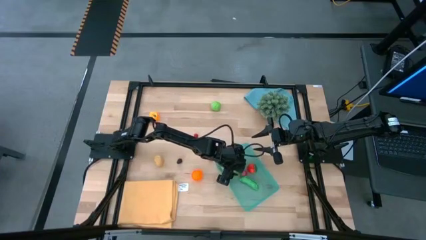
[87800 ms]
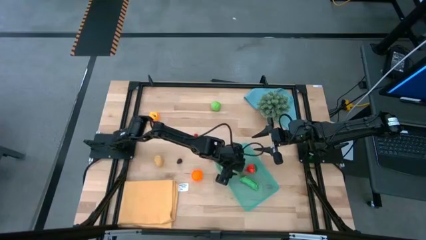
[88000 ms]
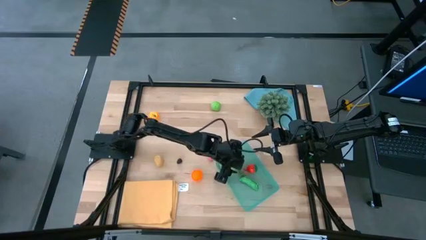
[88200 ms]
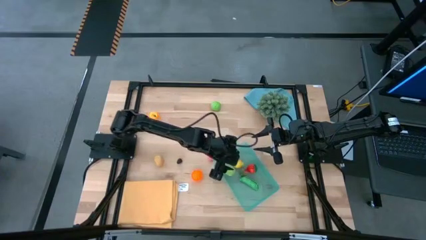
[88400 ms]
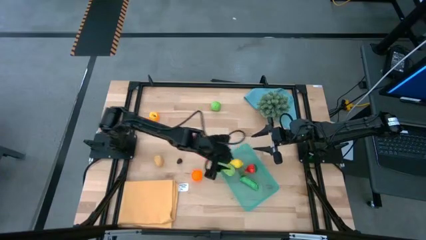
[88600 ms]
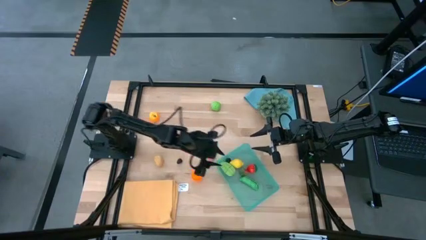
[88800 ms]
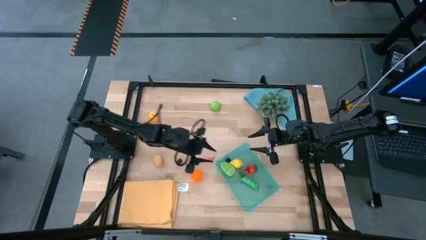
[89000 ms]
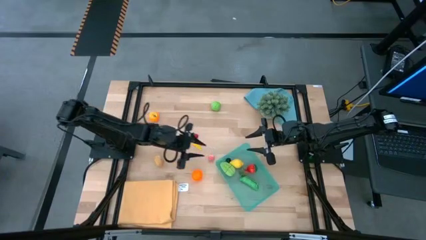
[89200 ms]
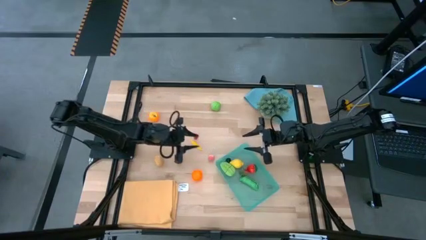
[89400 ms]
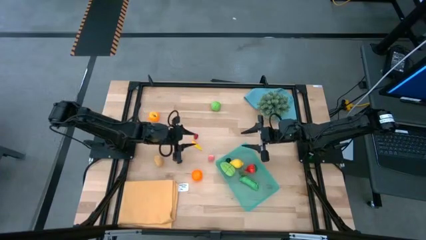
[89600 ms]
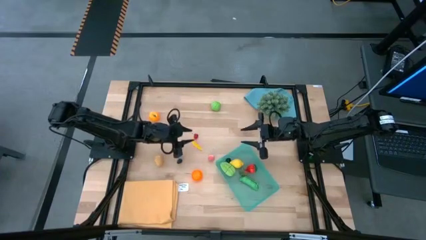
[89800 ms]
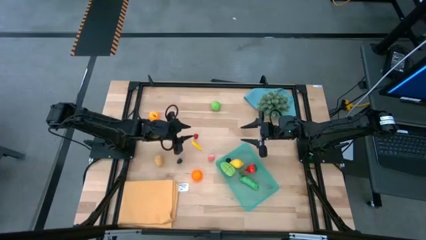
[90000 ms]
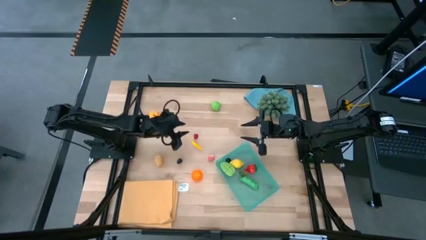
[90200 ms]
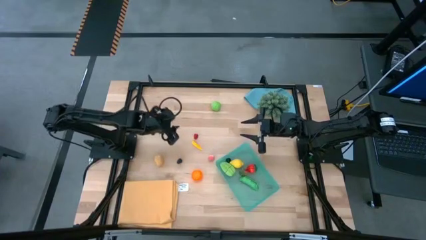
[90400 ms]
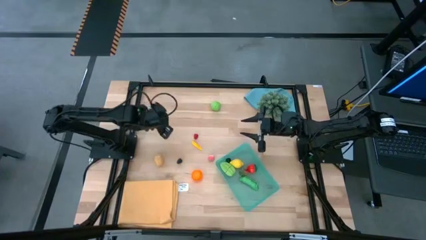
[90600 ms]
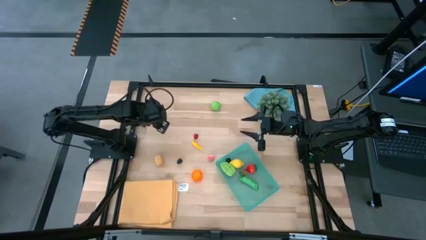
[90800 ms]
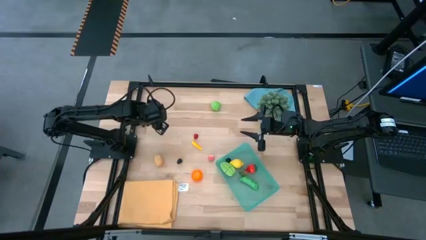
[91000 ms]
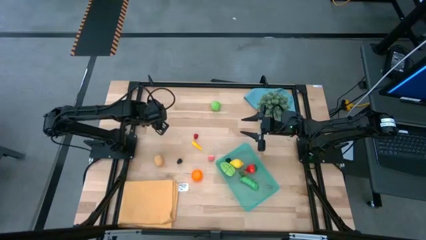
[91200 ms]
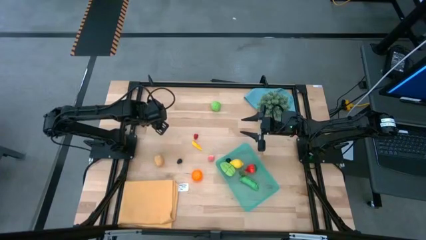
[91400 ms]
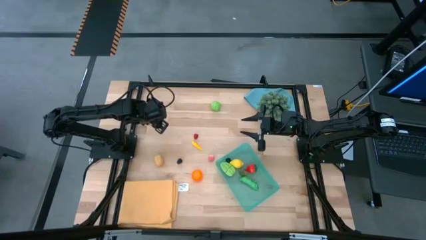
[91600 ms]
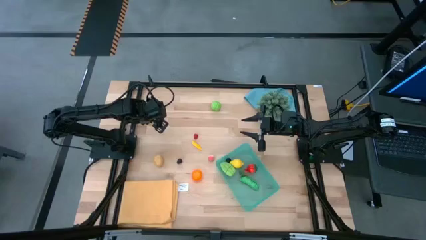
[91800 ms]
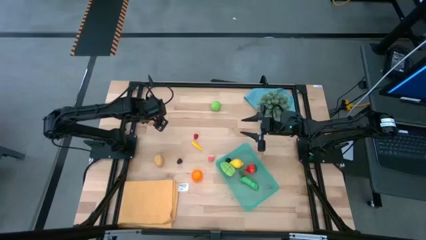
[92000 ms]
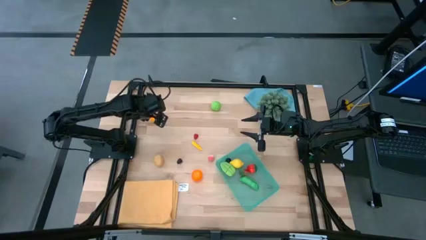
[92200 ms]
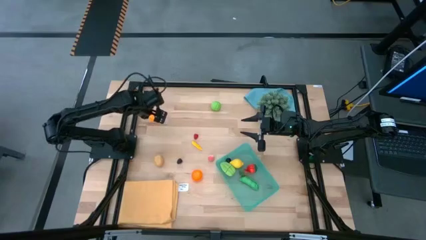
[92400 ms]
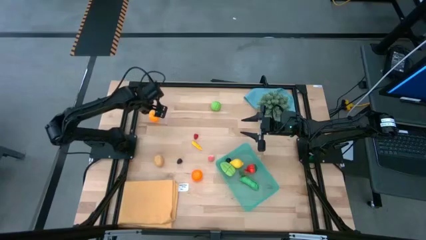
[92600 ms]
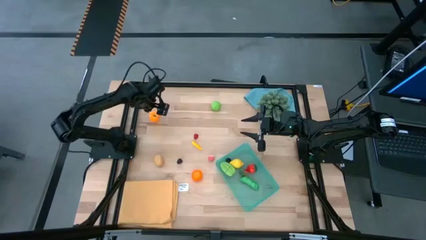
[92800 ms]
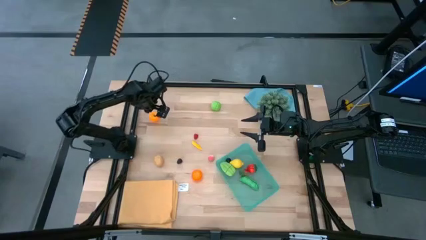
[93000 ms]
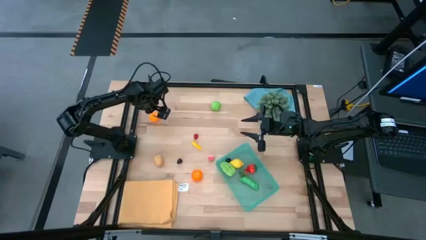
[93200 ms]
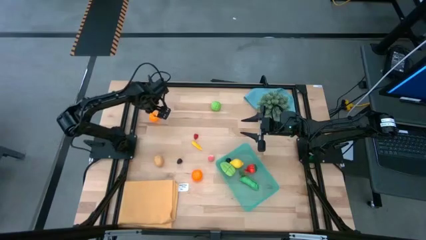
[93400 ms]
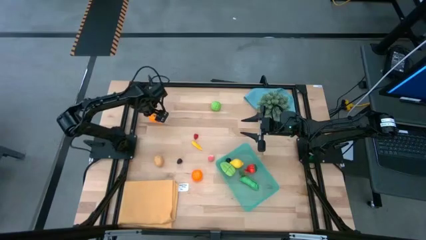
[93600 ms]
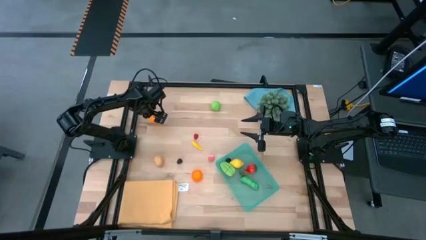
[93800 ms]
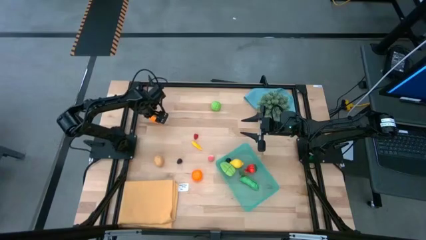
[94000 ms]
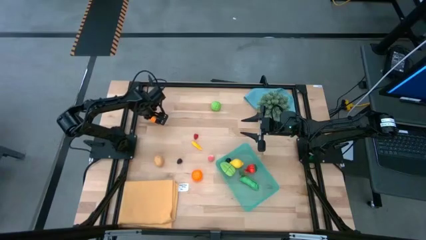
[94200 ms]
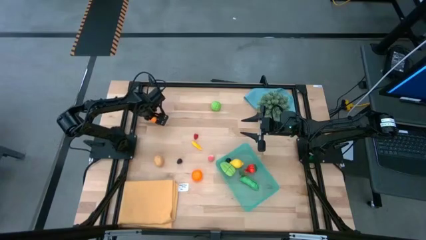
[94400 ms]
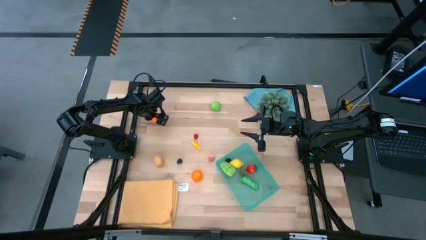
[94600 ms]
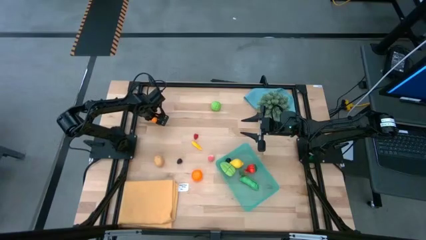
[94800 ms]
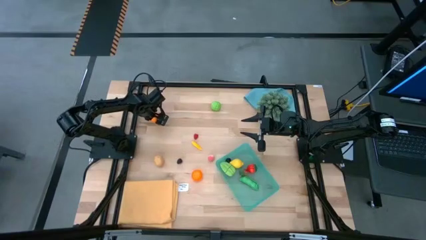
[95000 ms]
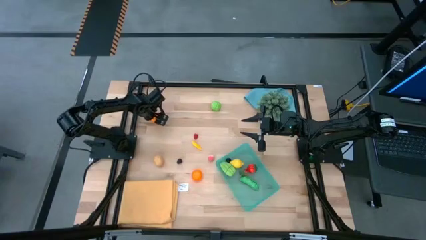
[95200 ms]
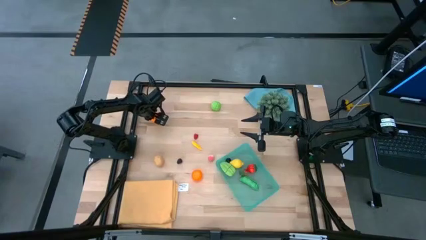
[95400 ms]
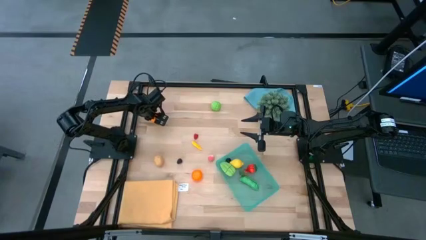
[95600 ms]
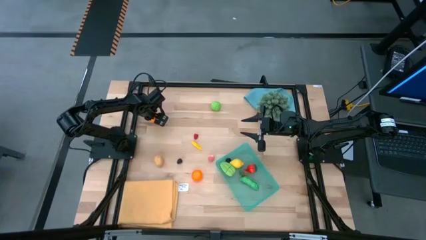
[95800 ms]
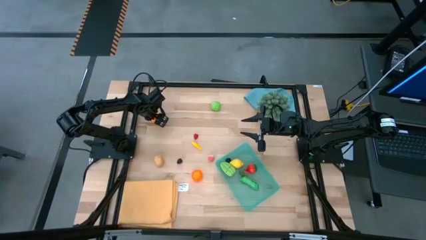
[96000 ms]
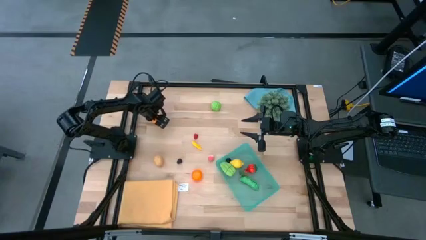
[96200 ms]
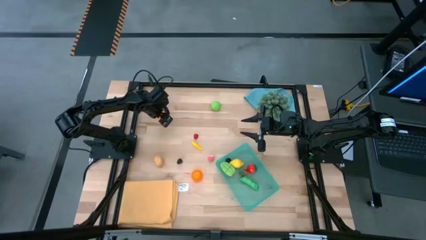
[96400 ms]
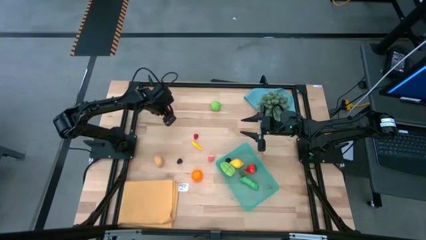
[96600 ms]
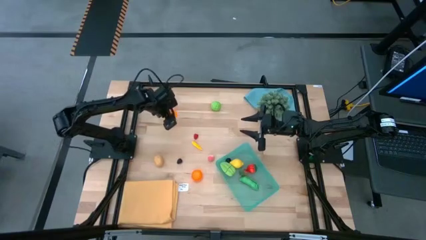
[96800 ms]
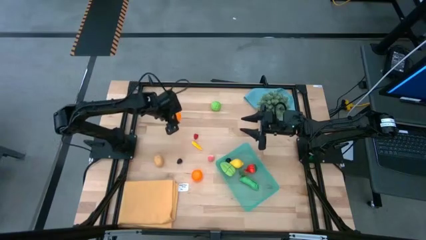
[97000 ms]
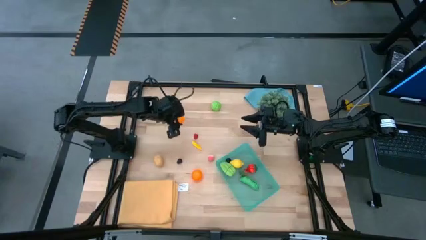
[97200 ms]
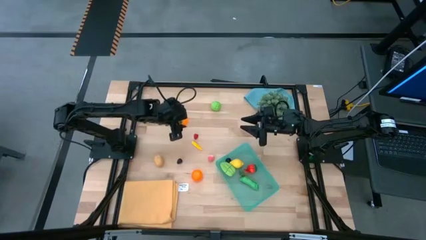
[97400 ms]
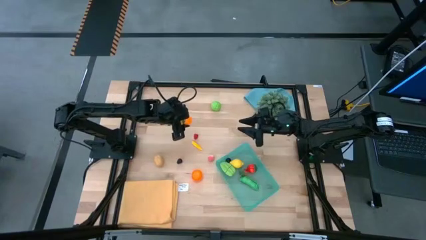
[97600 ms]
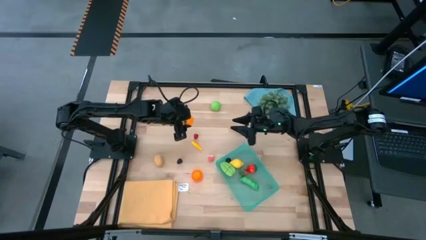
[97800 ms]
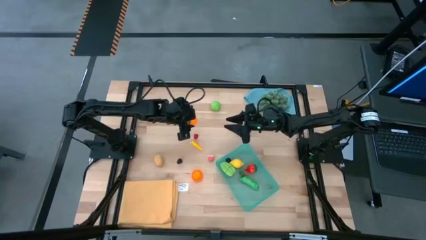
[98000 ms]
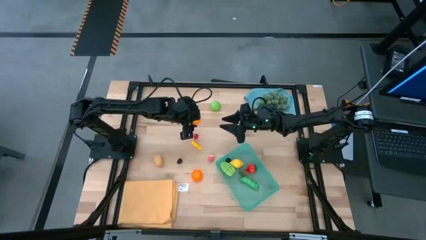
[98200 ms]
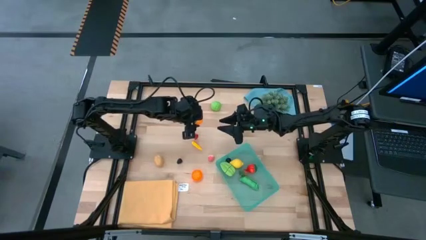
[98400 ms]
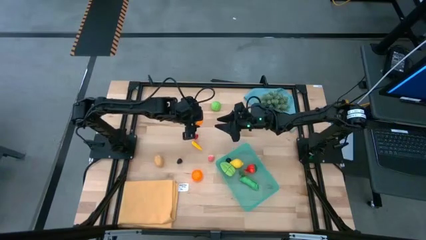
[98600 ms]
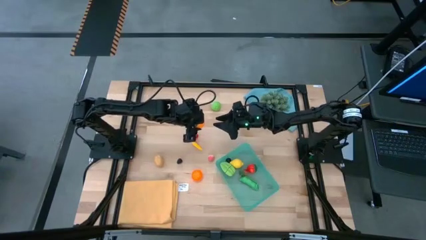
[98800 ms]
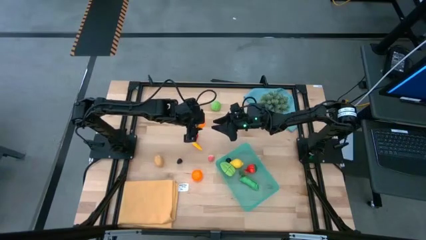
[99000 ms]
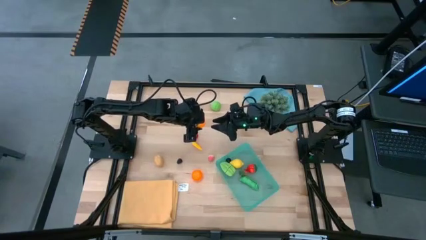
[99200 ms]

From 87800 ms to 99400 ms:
Task: Pick and placing Produce into tupperware
Put the orange into the green bin

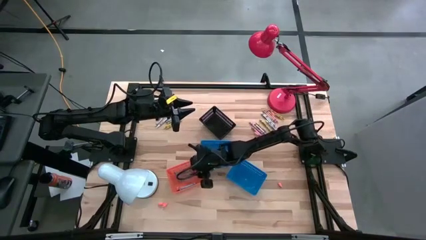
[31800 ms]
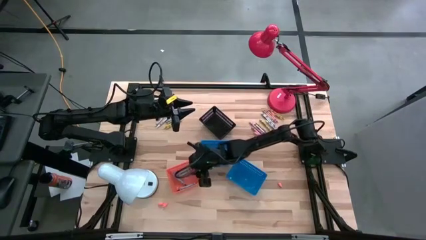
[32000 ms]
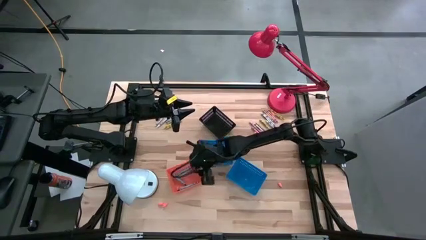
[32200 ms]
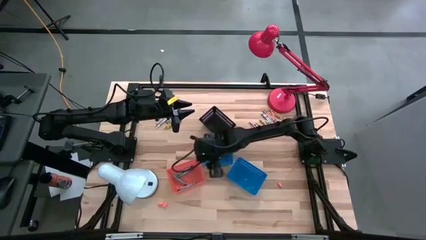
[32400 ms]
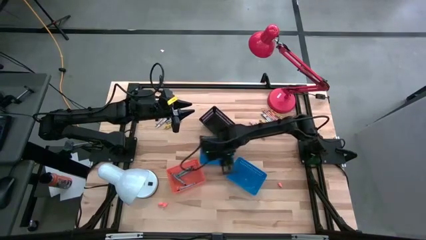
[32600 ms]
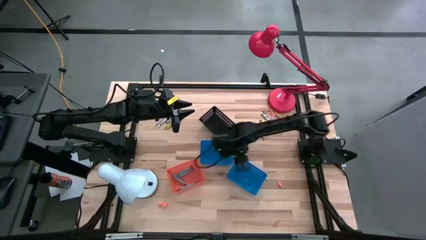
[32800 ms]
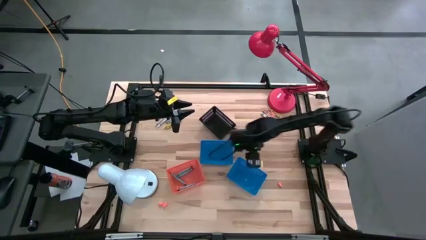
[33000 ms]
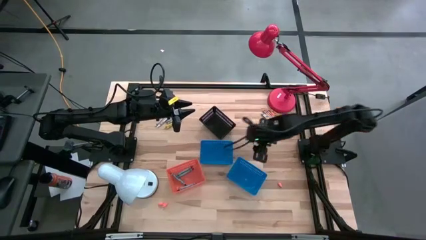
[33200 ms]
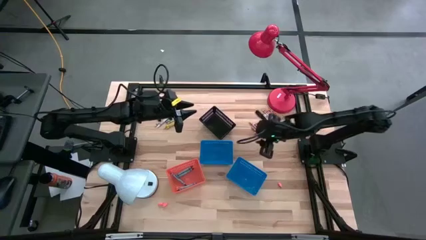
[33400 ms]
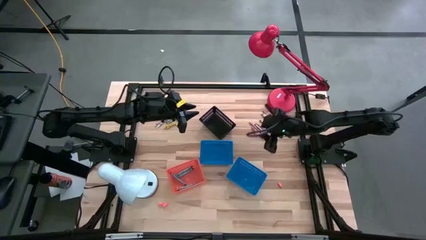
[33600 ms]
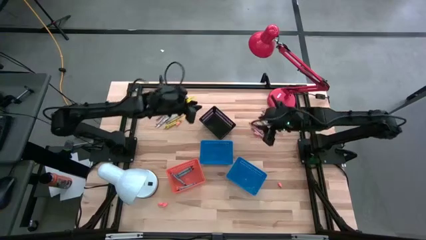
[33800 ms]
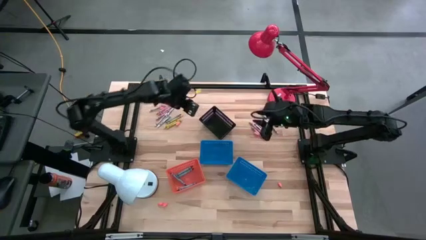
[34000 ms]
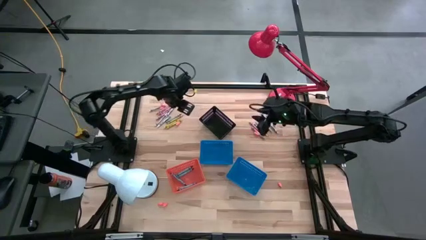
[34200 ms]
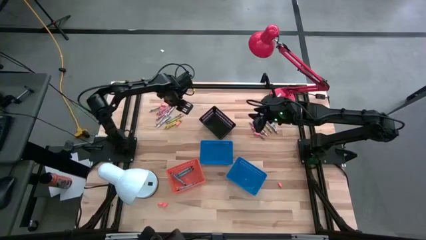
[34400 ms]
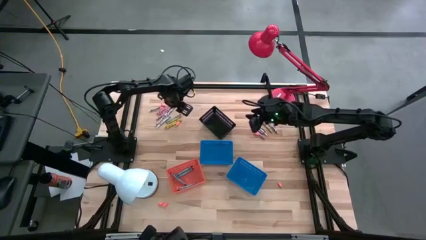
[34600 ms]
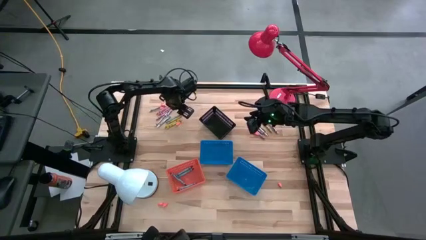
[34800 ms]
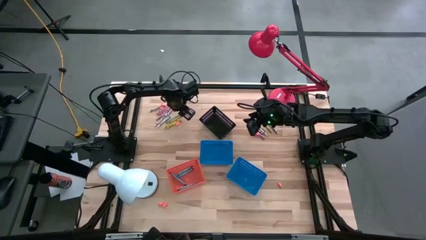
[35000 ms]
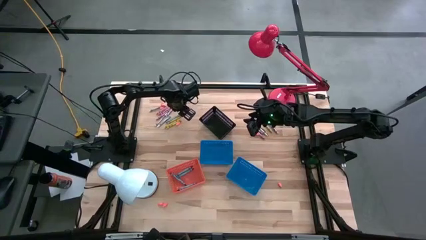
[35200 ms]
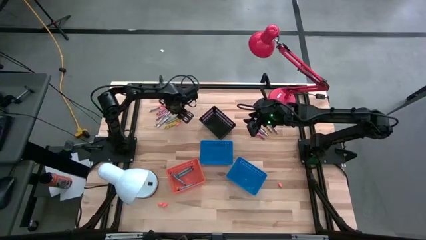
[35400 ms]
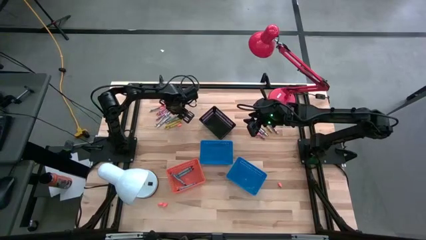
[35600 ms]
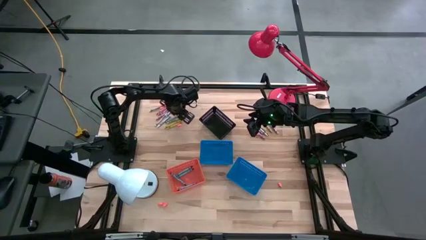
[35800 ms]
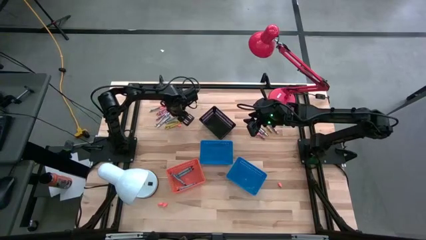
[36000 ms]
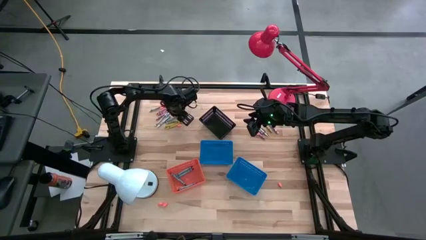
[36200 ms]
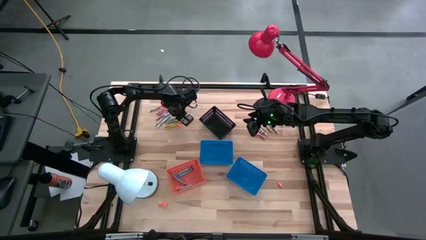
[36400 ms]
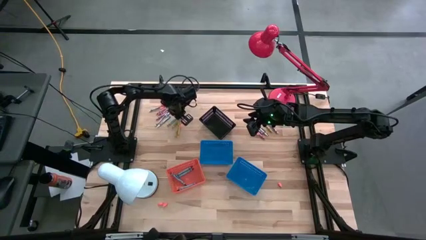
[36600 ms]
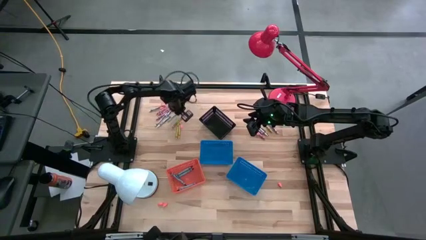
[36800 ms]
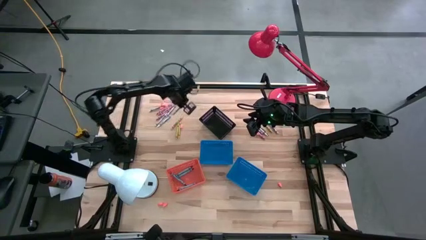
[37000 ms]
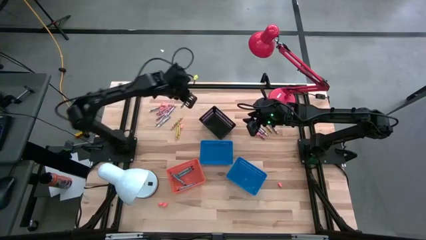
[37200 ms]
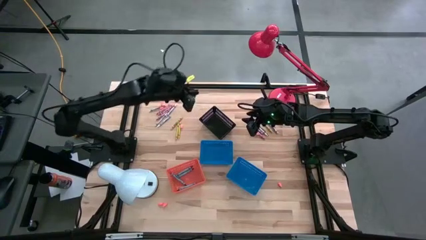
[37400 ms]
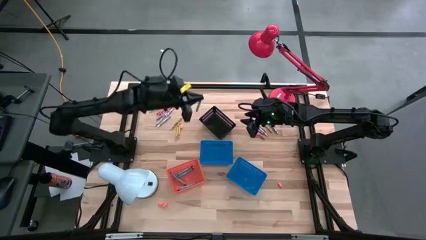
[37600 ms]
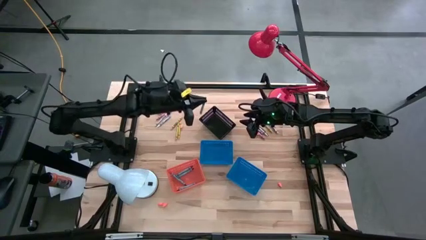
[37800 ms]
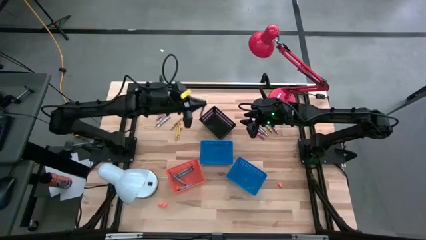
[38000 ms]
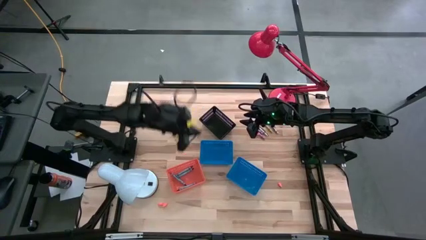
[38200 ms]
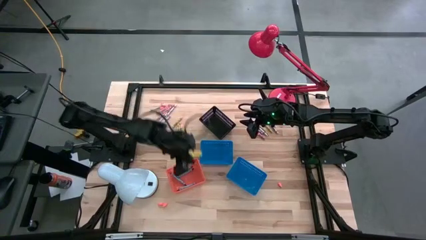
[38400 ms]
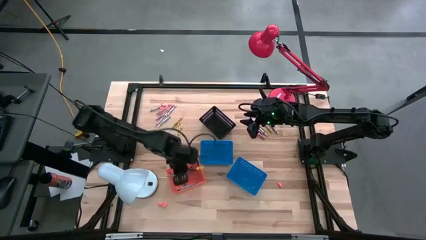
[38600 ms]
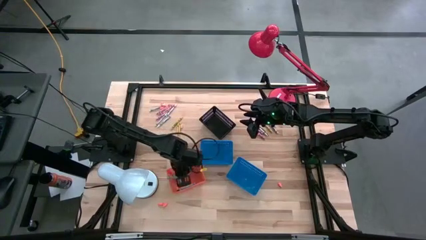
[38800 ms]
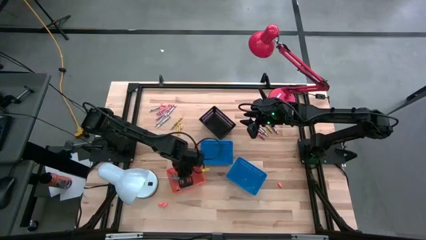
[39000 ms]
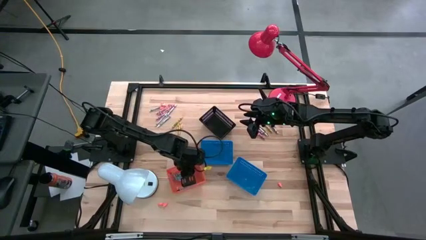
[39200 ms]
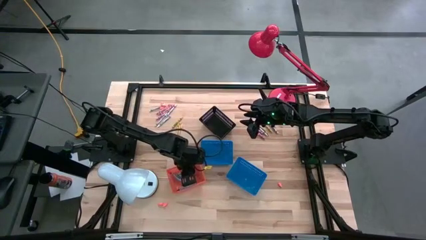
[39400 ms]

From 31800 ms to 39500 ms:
Task: Sort crayons
Put the blue/green crayon into the orange bin
